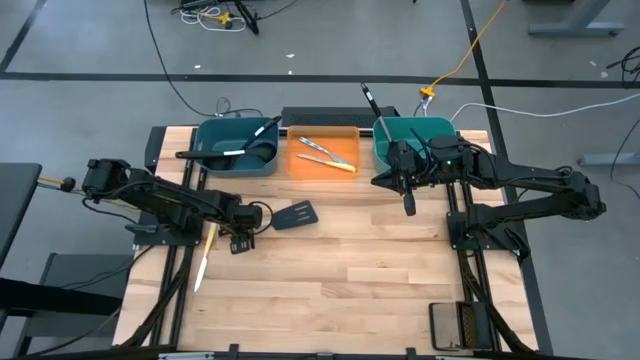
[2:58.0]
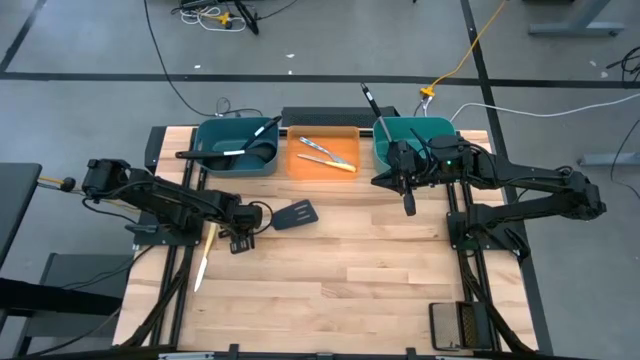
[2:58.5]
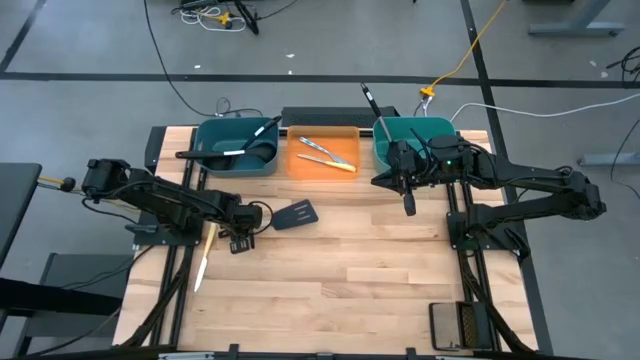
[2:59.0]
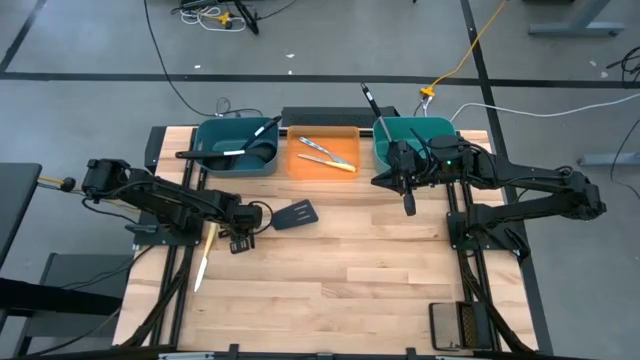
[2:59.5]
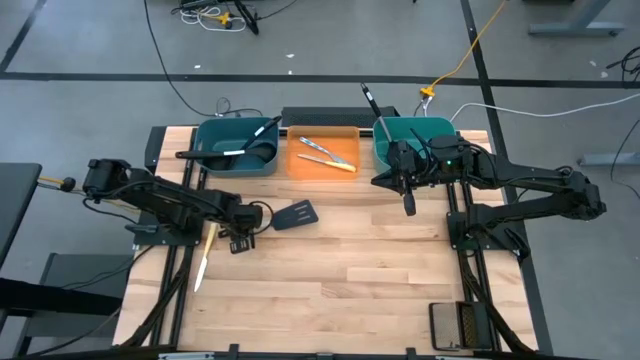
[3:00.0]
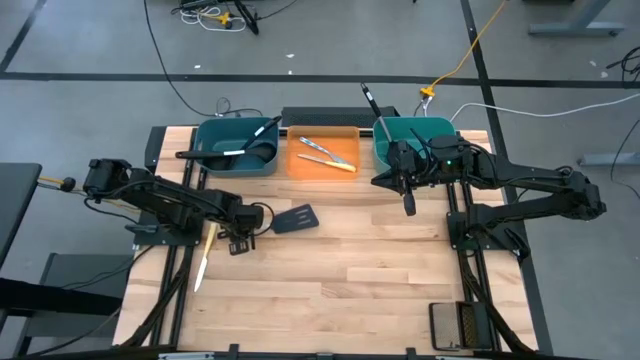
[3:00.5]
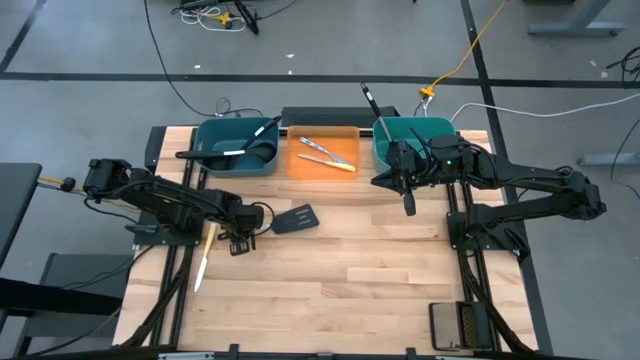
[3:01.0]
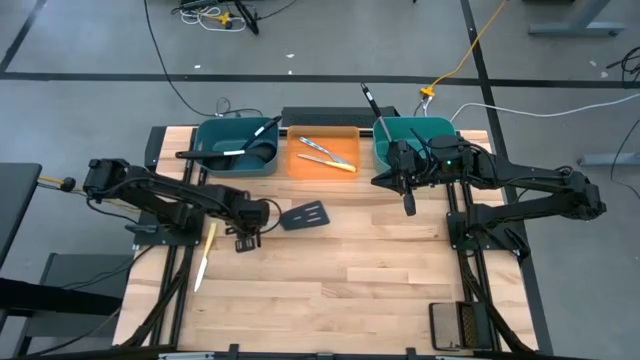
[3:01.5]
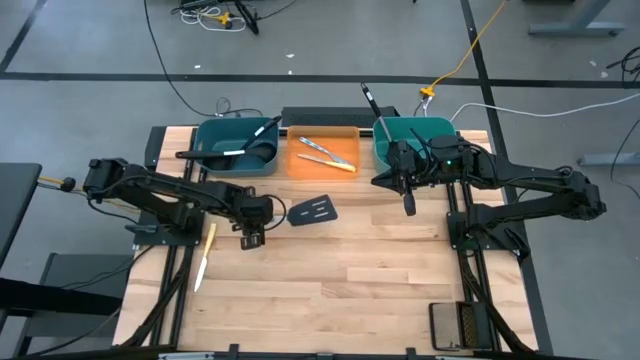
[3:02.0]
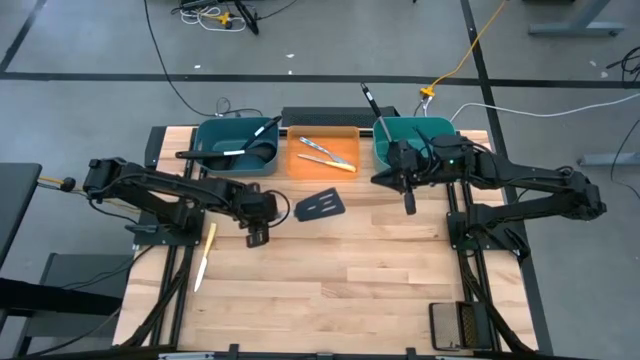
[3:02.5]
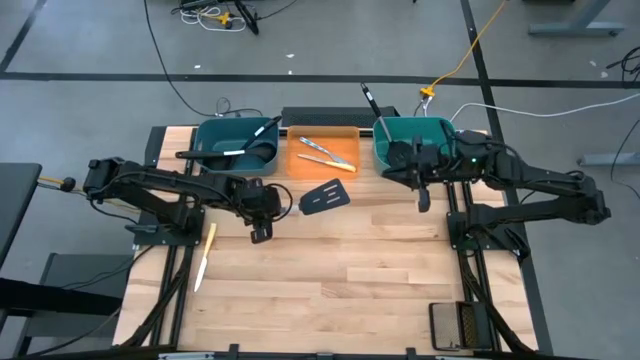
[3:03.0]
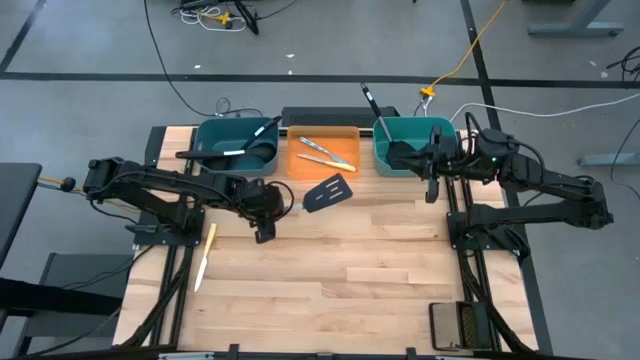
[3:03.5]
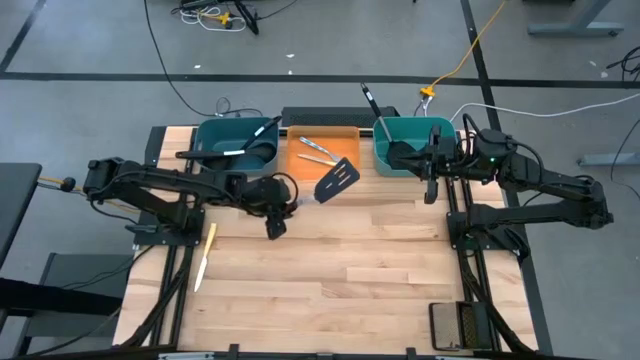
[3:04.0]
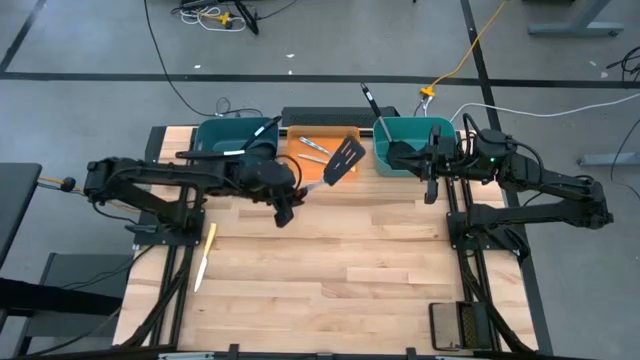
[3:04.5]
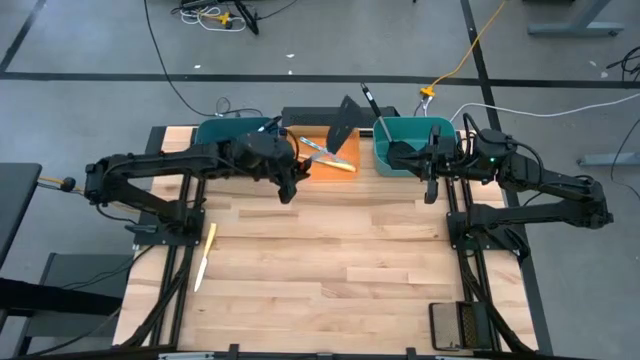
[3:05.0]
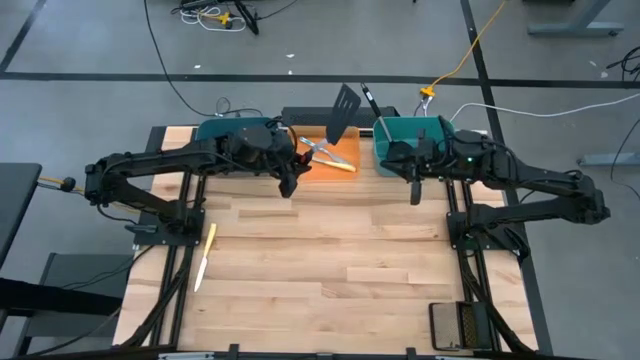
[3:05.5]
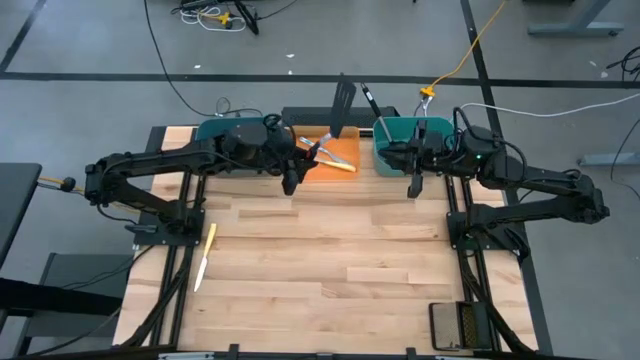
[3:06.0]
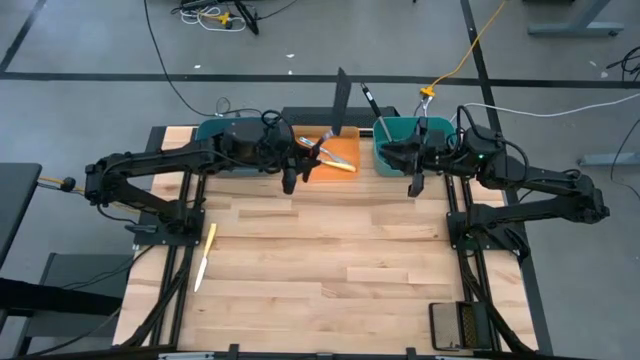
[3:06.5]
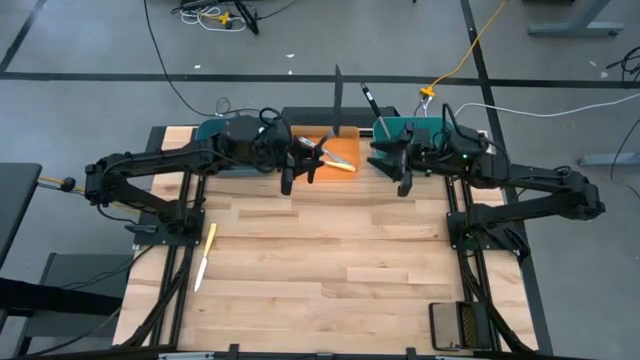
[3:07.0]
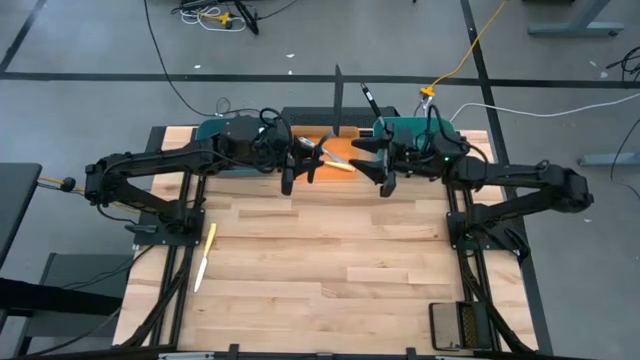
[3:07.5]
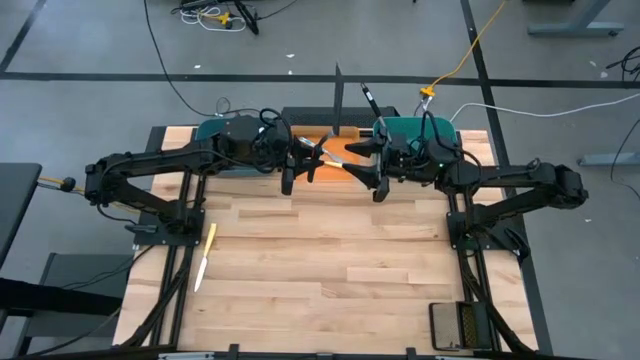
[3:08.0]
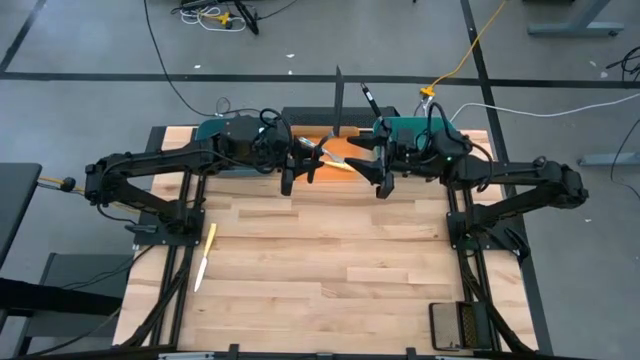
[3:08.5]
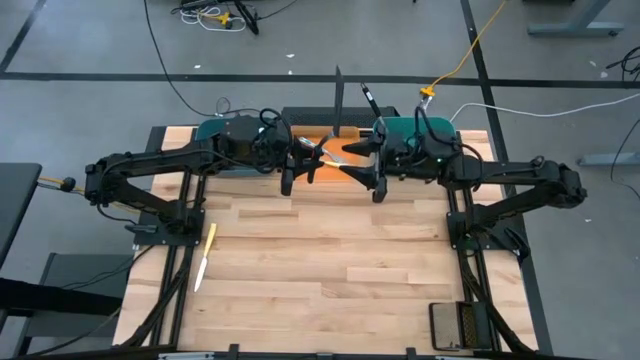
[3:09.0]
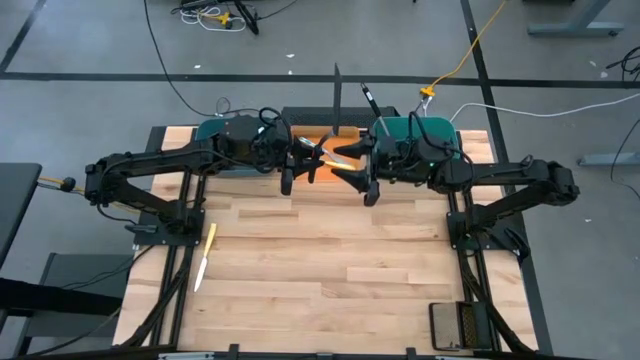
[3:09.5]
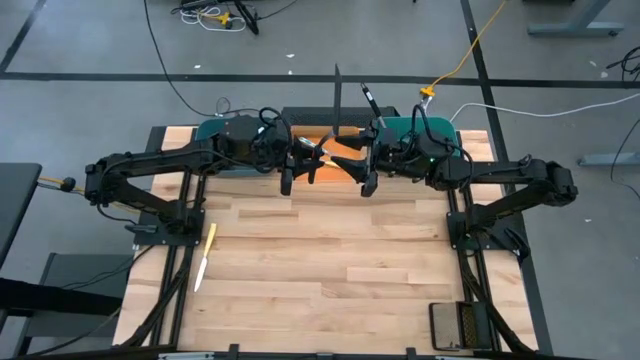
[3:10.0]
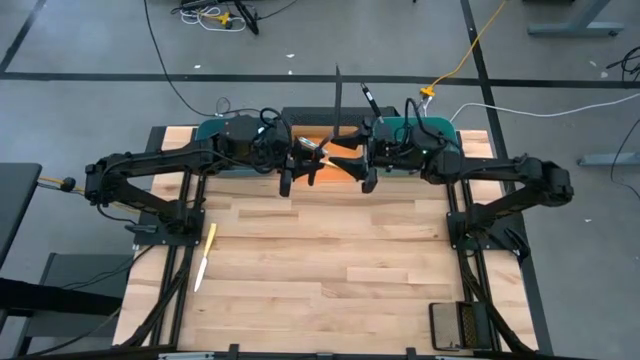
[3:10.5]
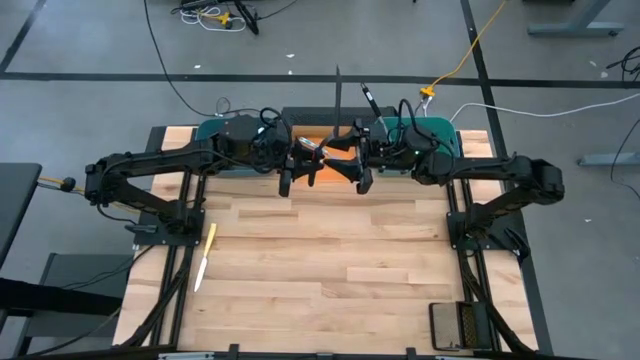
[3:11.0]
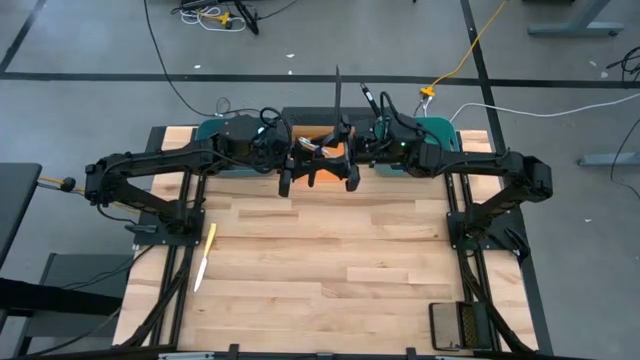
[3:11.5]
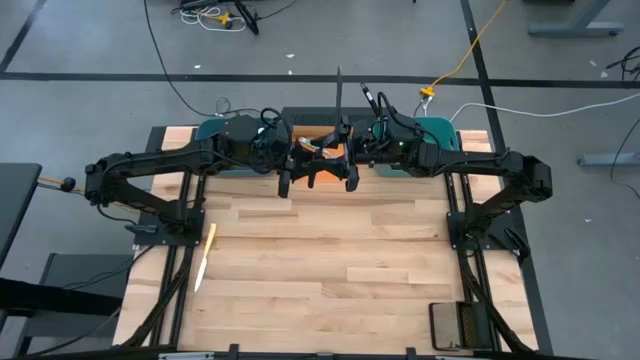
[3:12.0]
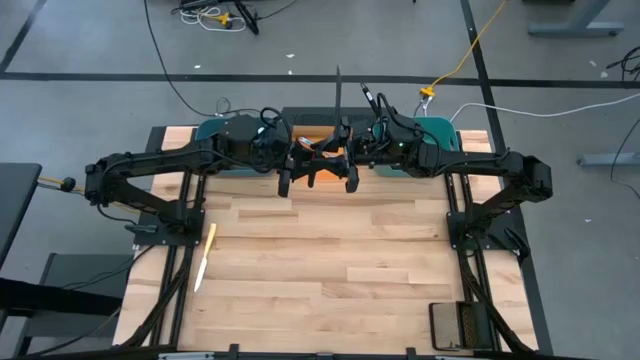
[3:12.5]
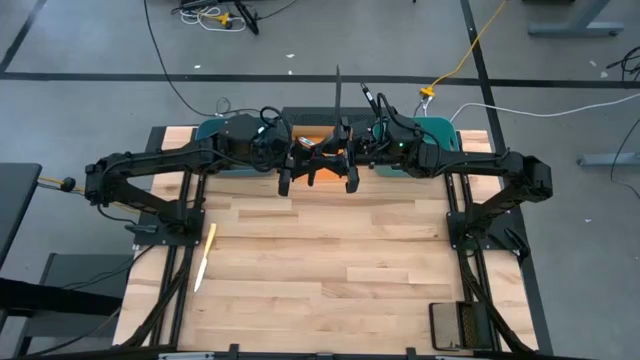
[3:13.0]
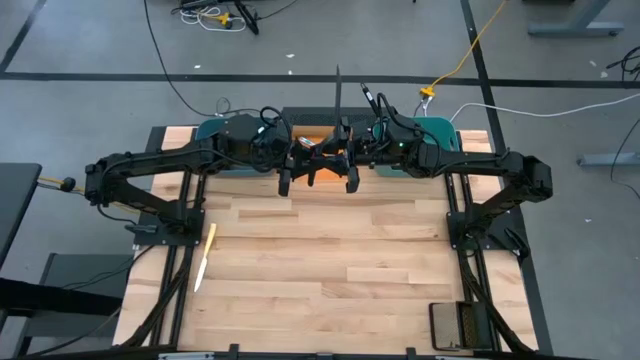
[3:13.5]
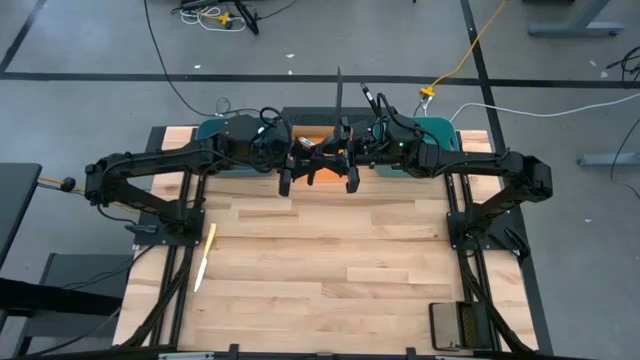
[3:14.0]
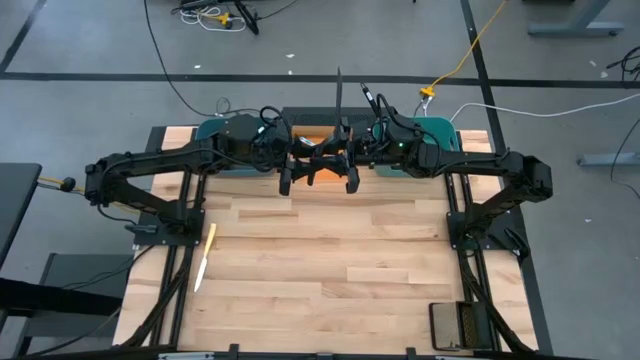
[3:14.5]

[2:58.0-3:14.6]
Task: Pick & Place Kitchen Items
Put the black spatula into the green bin

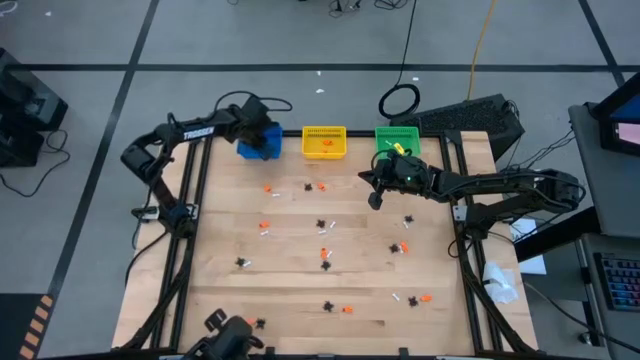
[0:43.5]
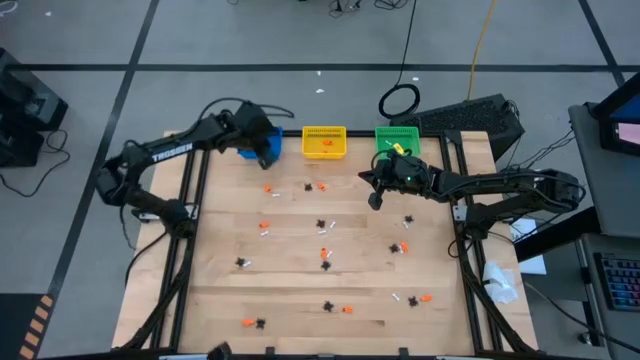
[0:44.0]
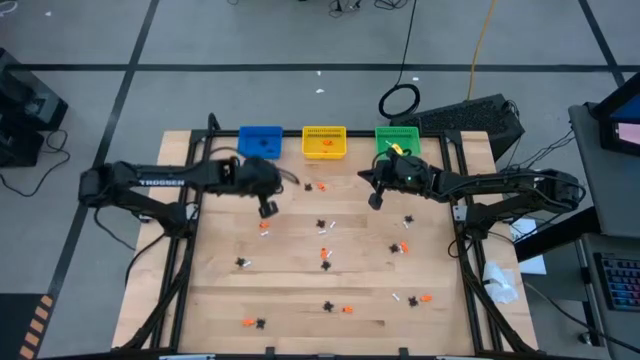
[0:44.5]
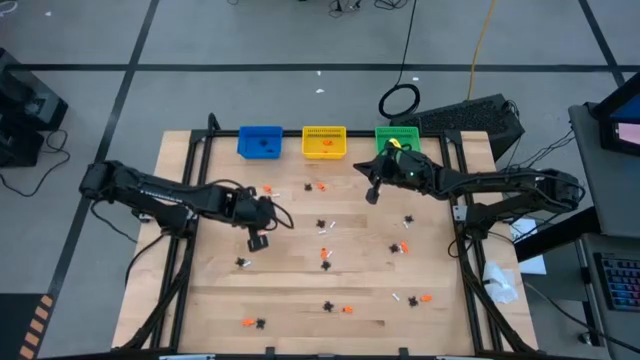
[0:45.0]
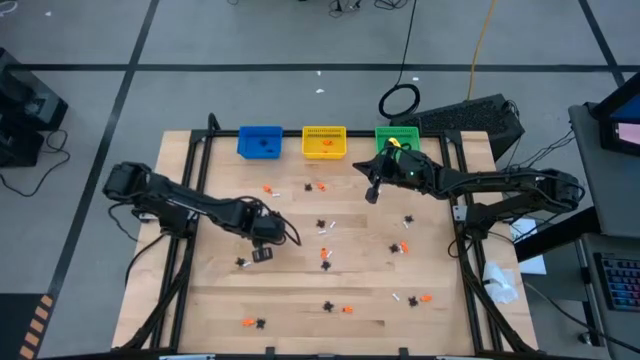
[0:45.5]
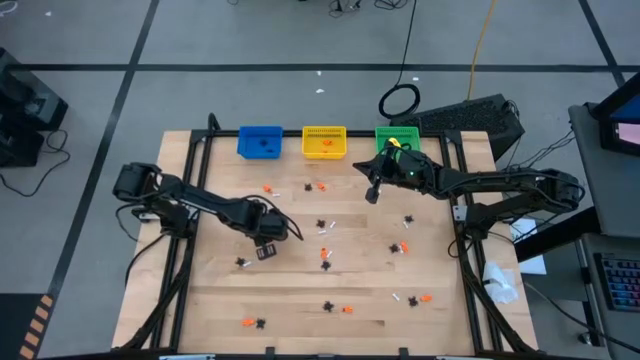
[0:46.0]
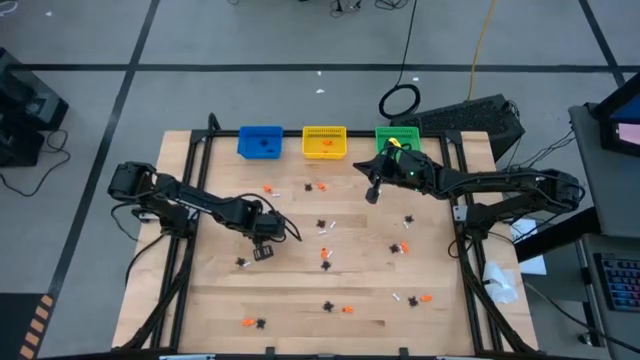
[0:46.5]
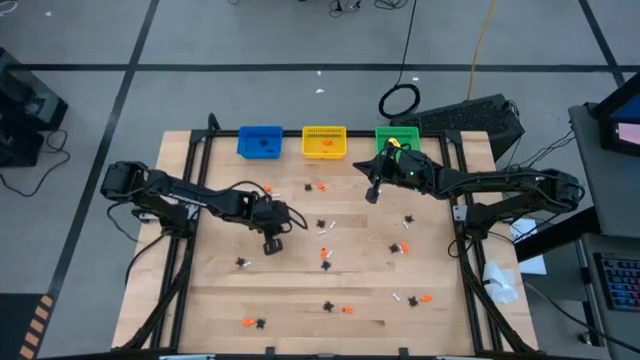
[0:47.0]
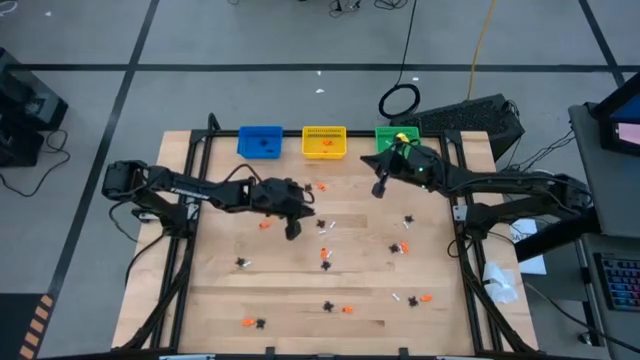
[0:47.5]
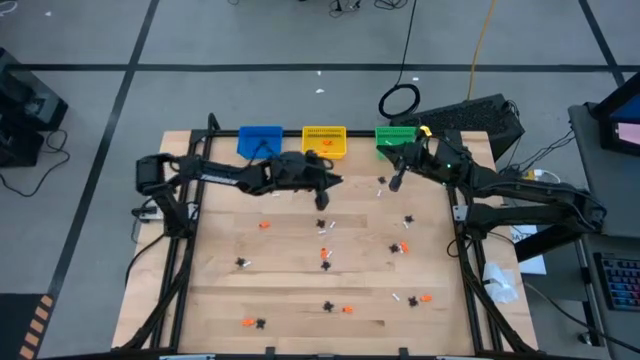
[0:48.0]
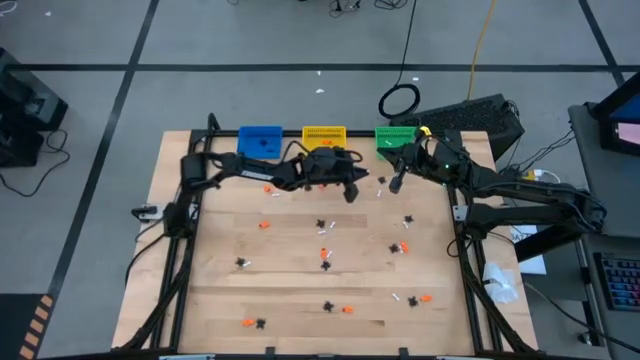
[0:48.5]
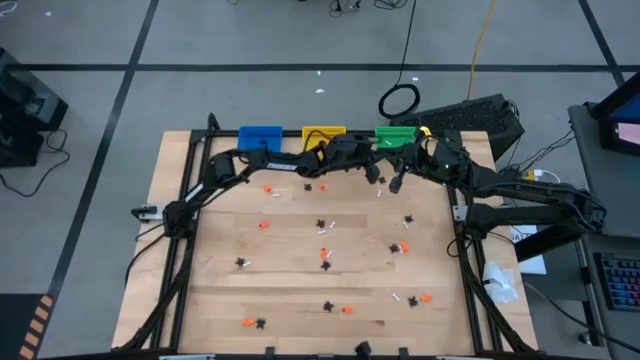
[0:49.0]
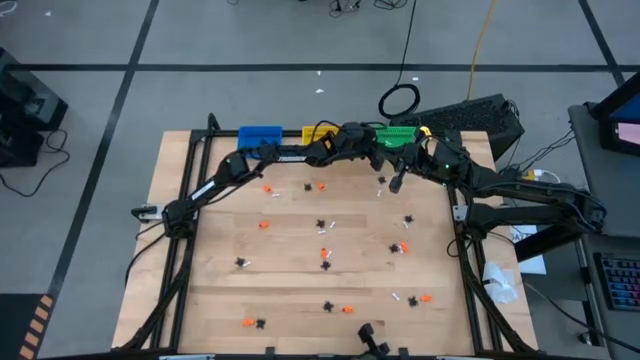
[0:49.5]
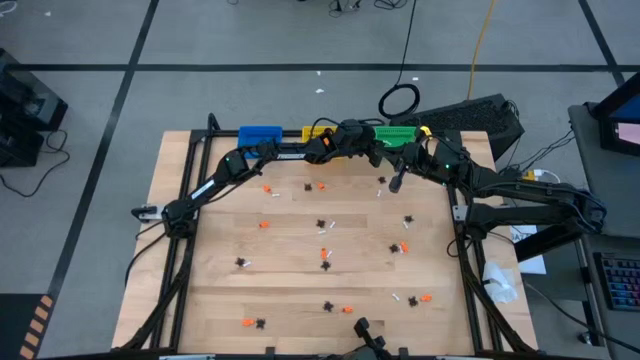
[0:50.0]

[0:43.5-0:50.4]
Task: Sort Halloween decoration
Put the white bone toy into the green bin
